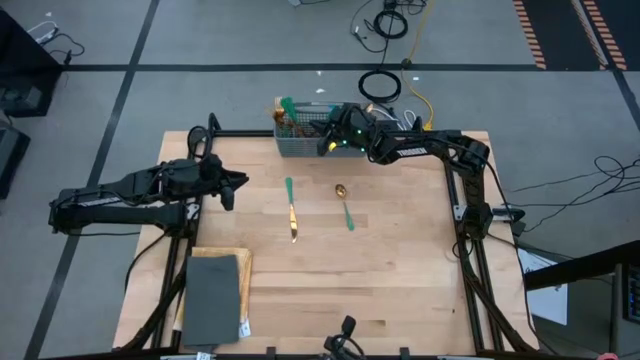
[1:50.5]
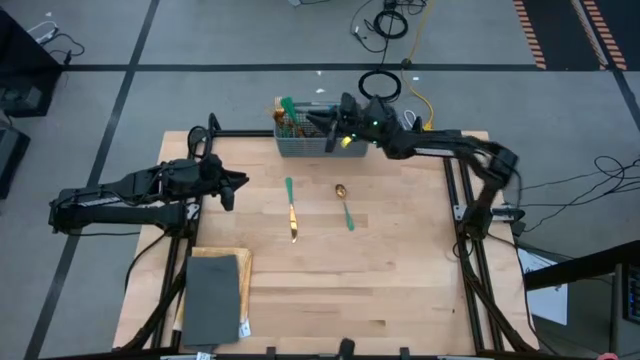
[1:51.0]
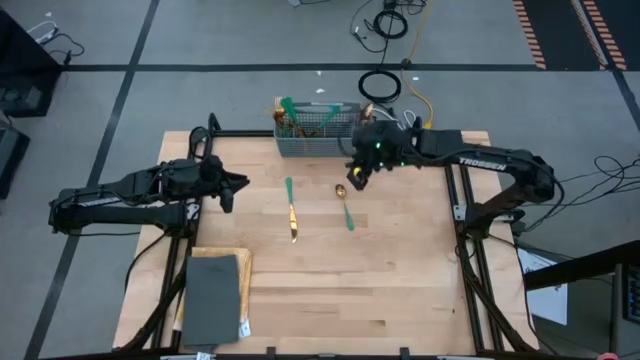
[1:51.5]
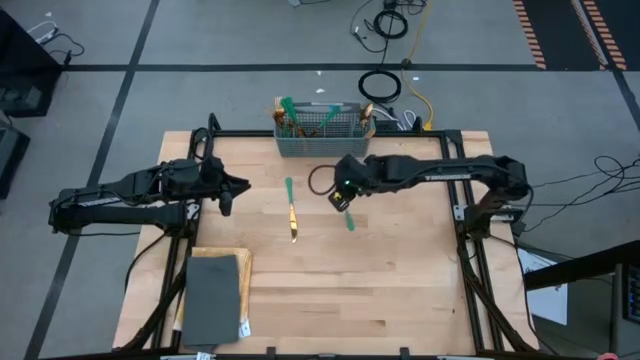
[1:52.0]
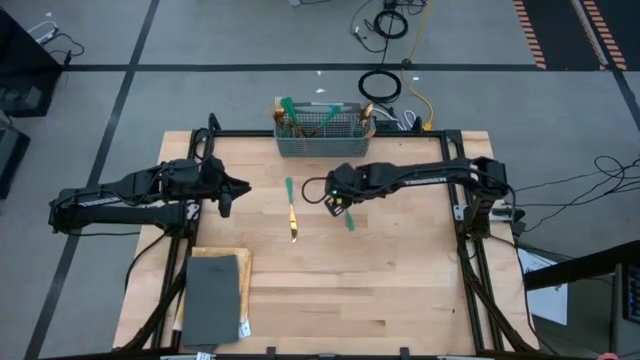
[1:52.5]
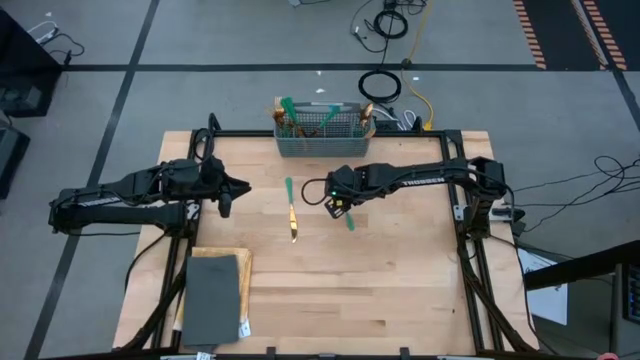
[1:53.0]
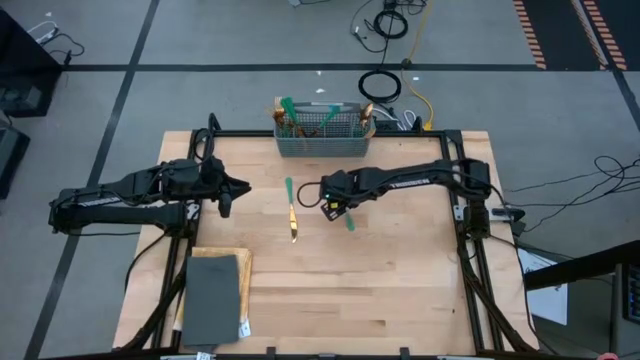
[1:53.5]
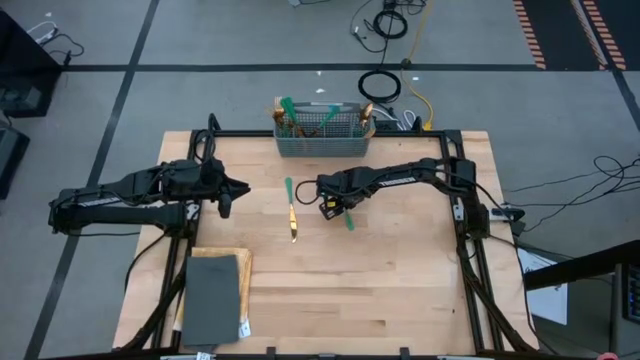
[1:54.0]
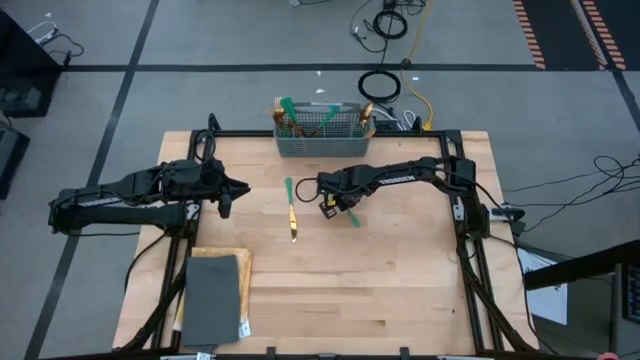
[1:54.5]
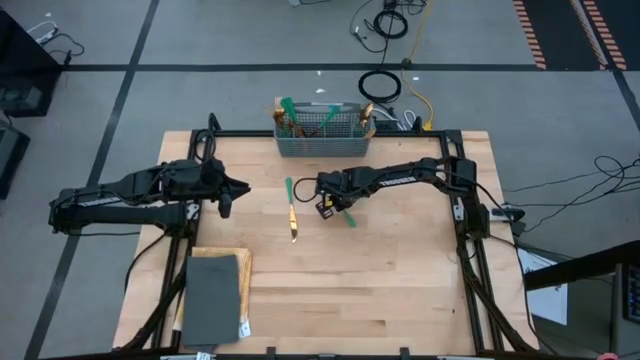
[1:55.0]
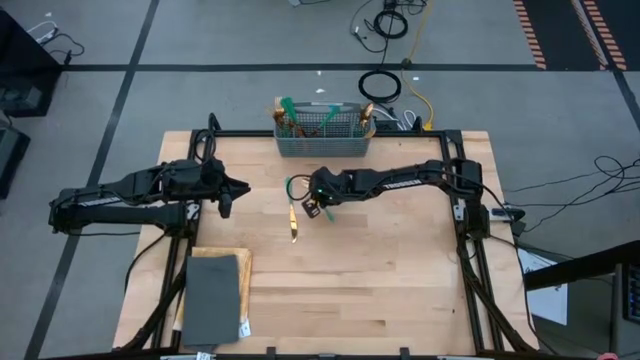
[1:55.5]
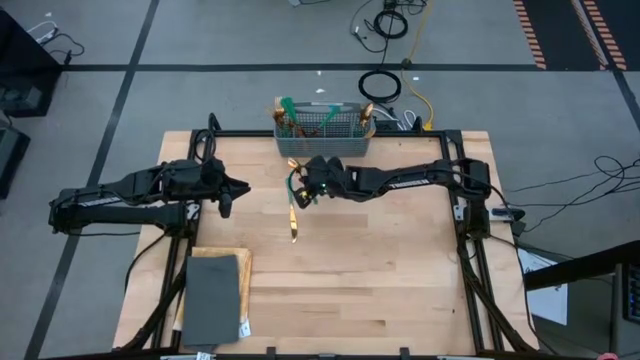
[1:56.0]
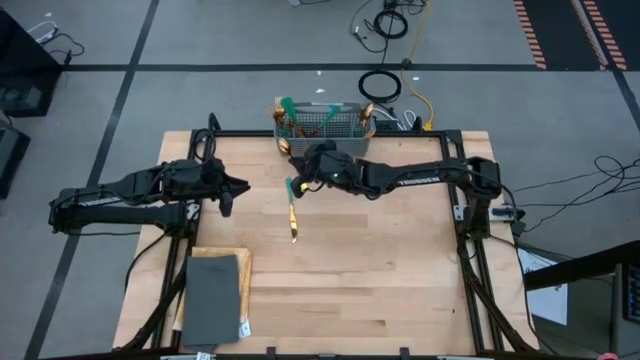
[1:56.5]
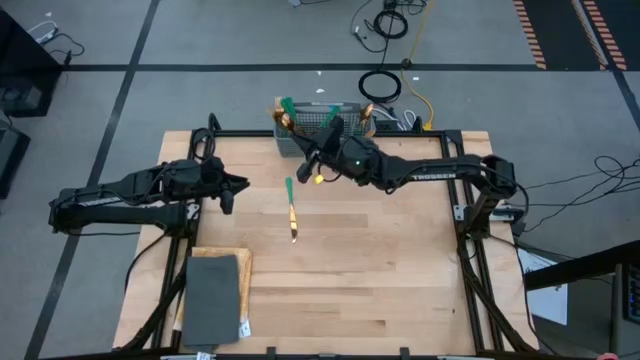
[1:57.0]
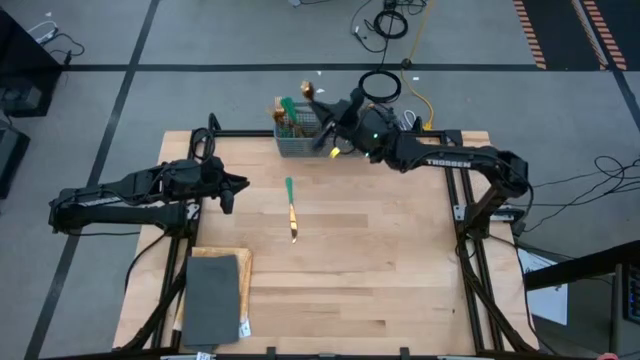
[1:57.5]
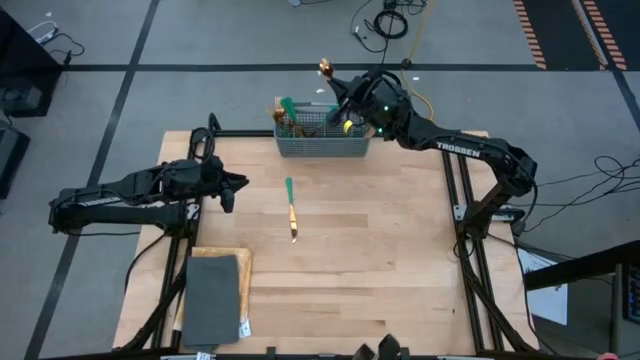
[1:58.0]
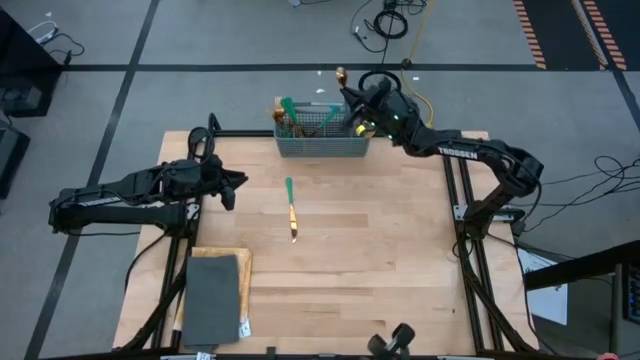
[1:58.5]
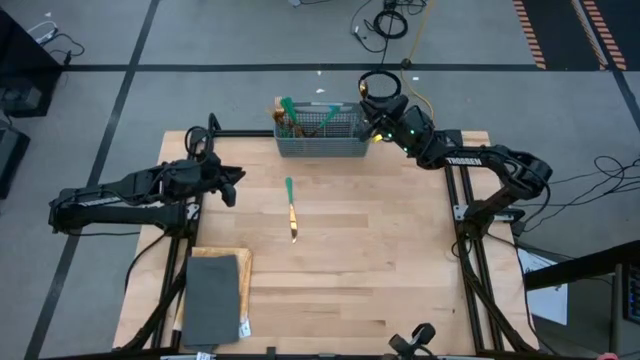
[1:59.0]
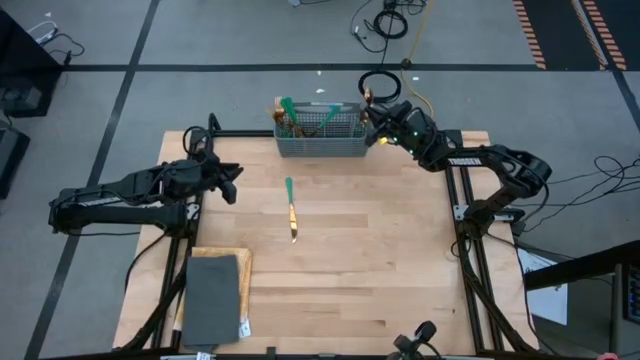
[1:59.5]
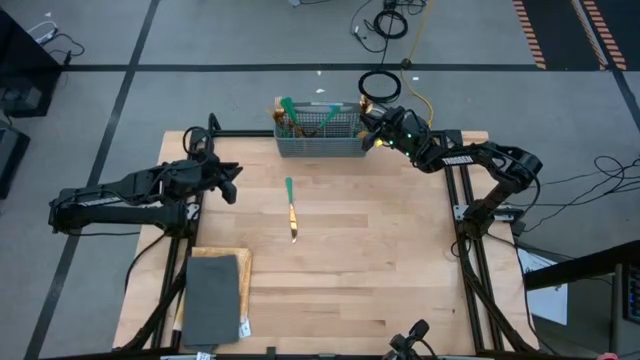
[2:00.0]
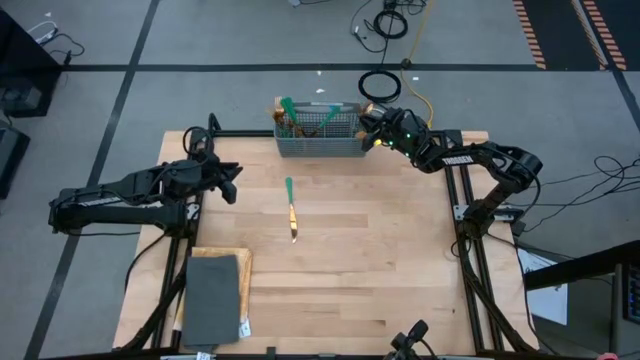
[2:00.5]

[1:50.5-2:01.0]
Task: Sort silverware
Put the green spoon into the silverware basket

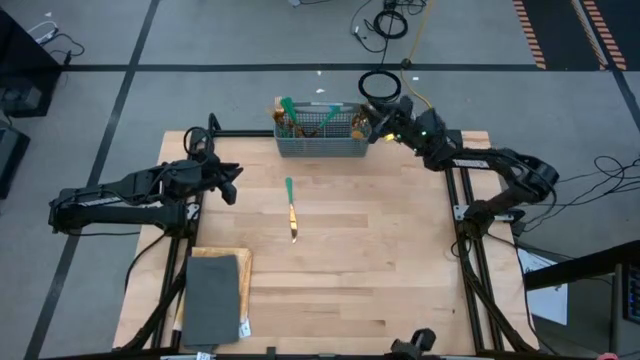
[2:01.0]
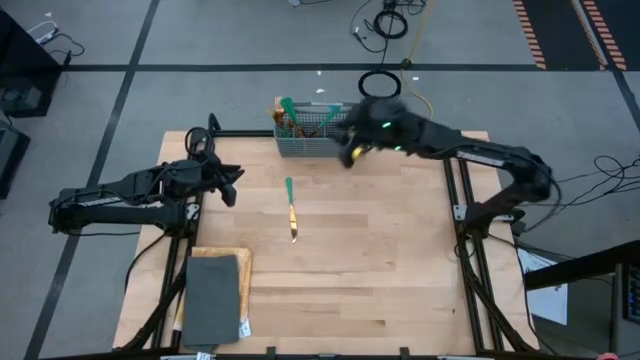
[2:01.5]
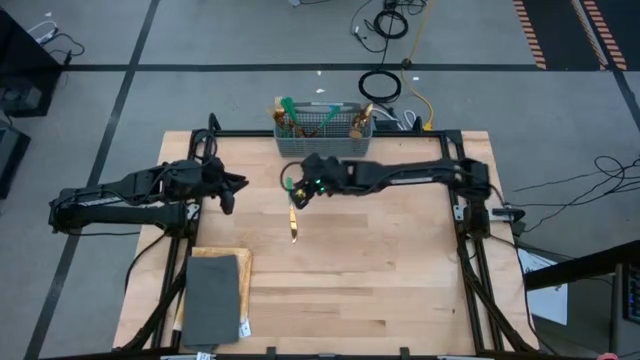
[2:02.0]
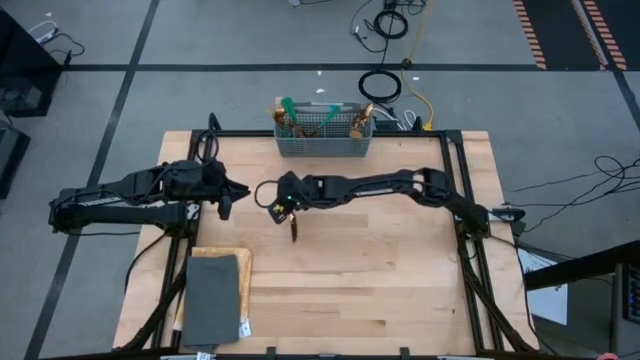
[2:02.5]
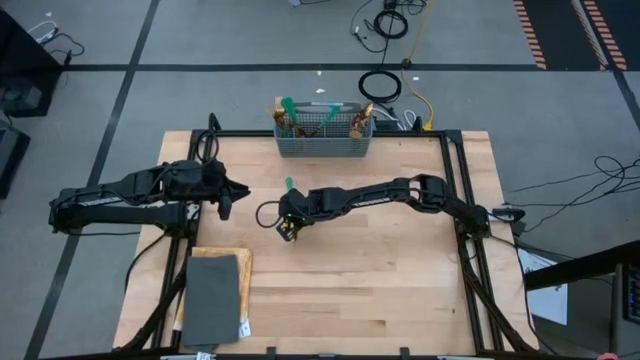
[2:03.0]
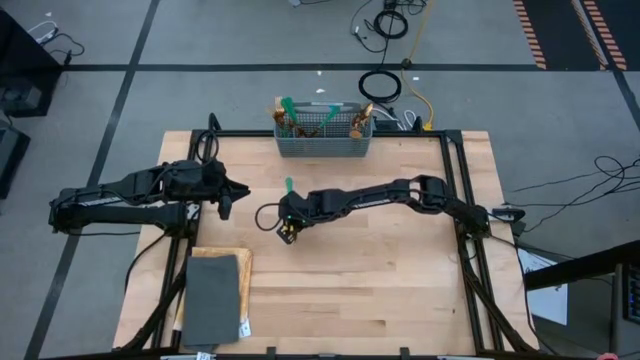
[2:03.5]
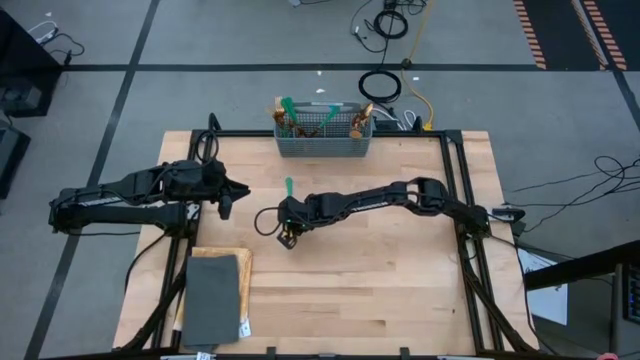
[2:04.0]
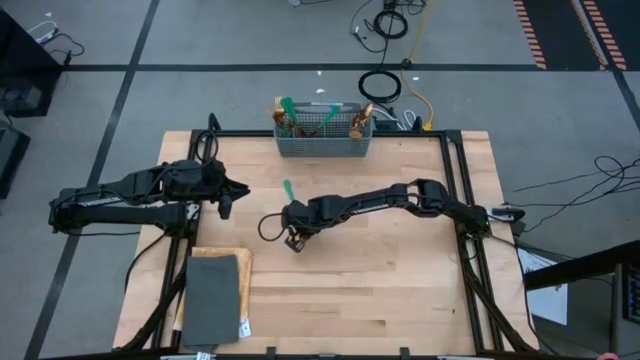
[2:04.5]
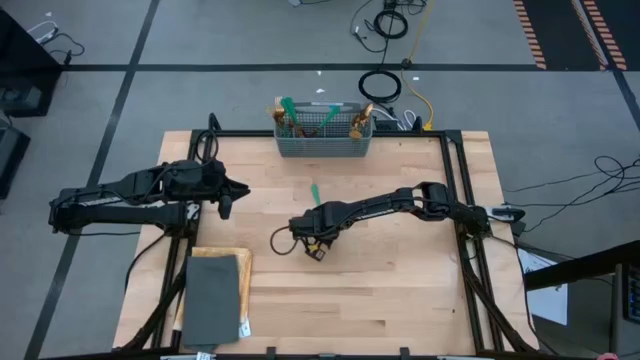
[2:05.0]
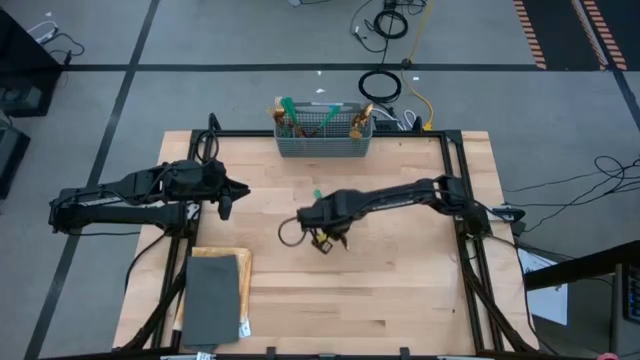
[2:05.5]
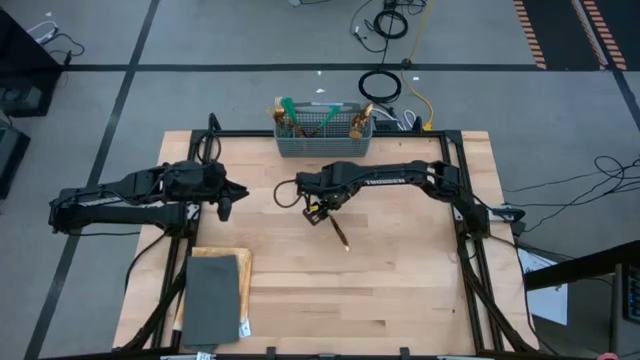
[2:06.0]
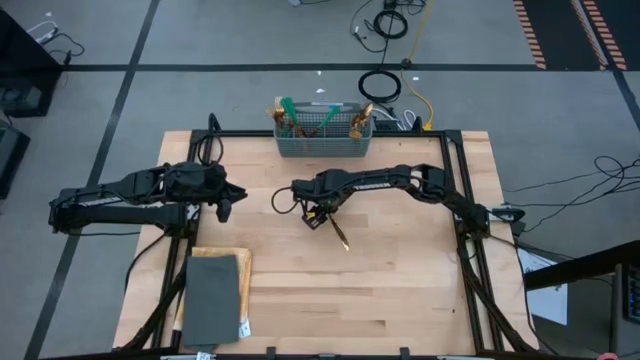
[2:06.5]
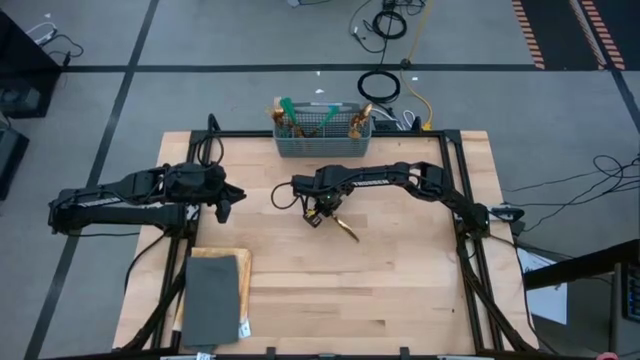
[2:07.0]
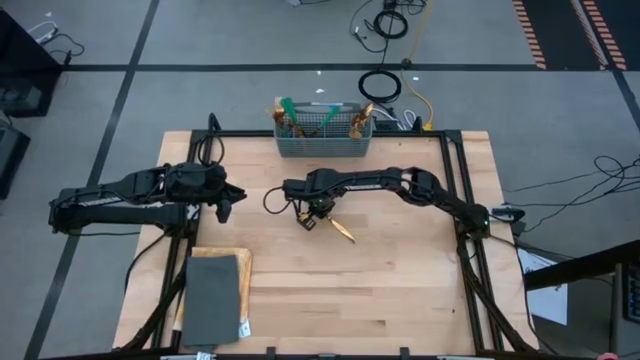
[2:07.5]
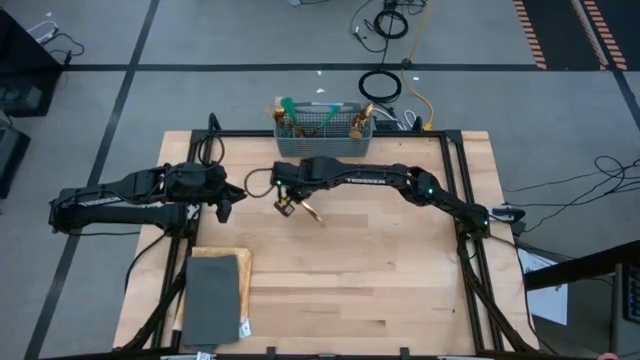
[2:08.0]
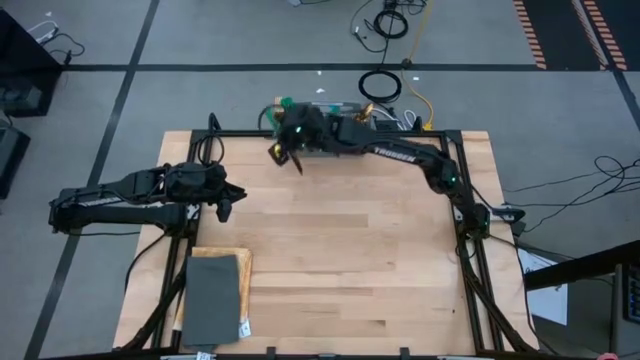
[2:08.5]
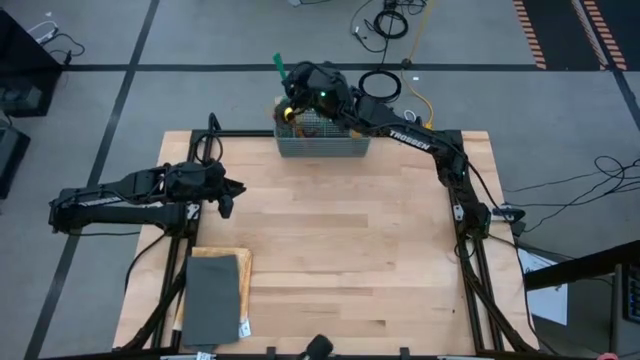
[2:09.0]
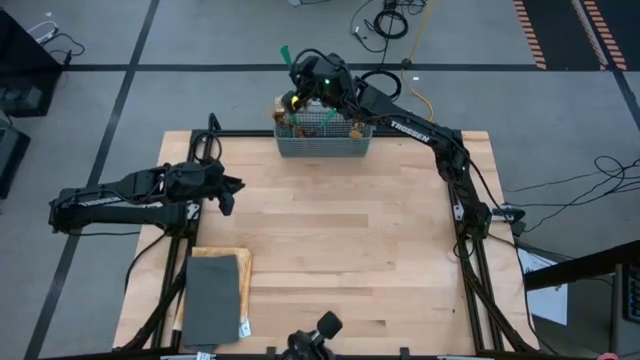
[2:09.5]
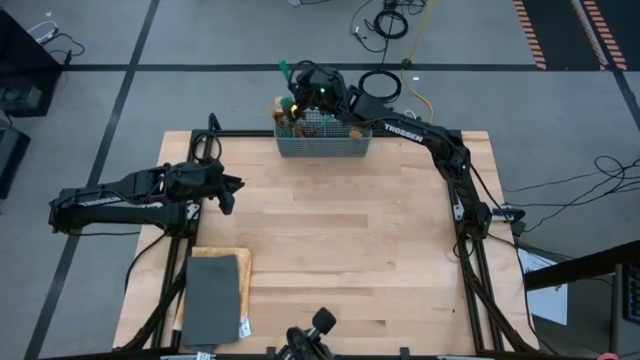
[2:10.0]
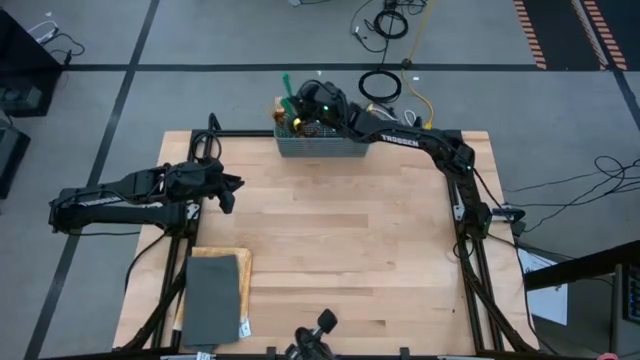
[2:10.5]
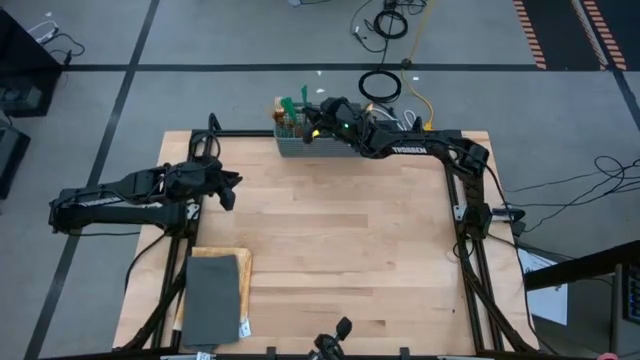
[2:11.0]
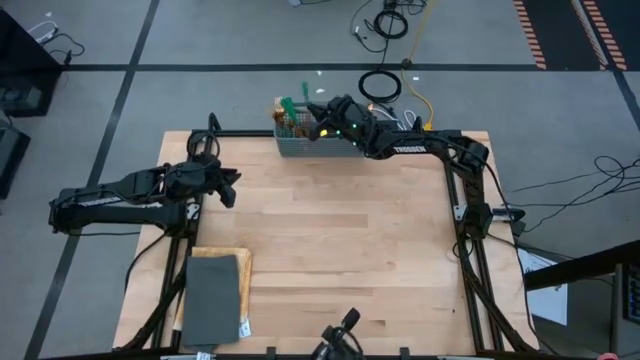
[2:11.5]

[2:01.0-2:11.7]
Put the green knife into the silverware basket
